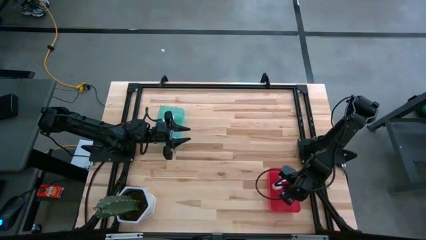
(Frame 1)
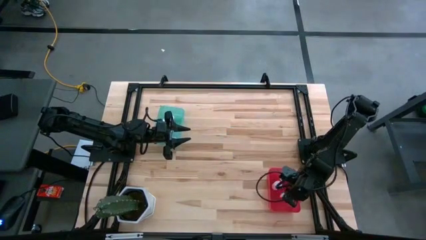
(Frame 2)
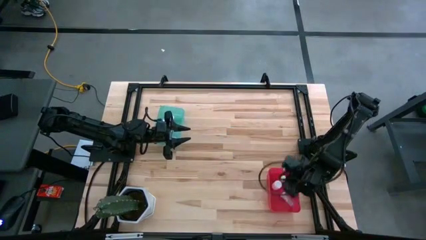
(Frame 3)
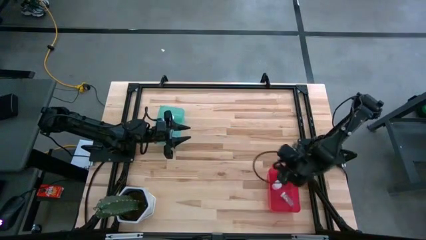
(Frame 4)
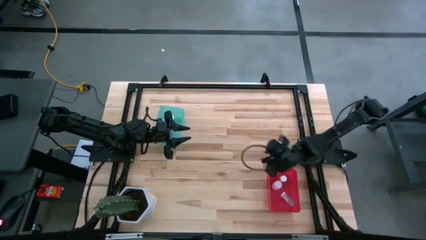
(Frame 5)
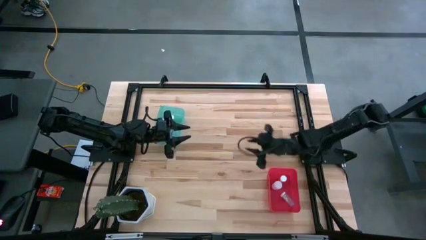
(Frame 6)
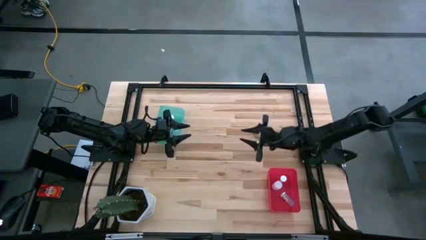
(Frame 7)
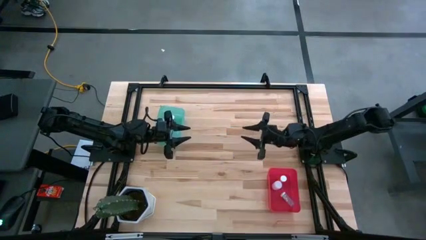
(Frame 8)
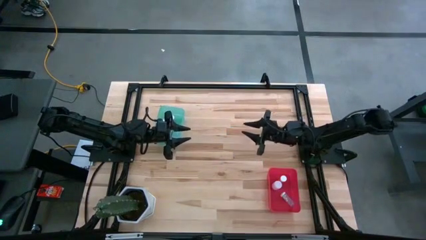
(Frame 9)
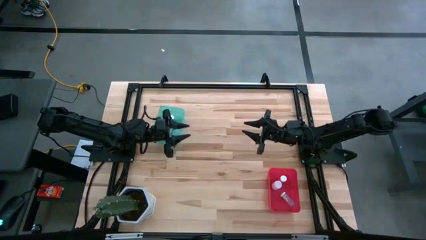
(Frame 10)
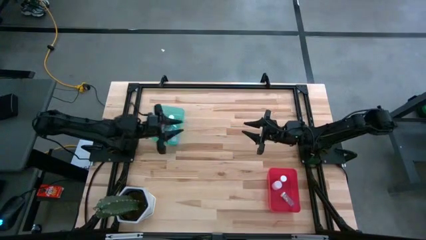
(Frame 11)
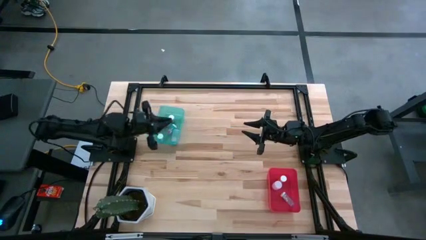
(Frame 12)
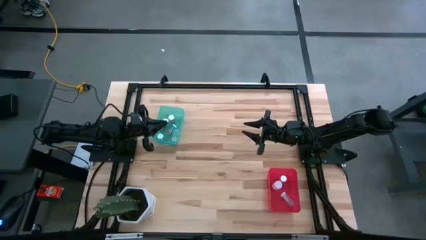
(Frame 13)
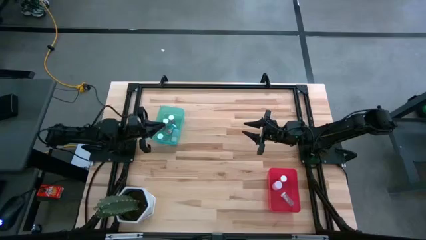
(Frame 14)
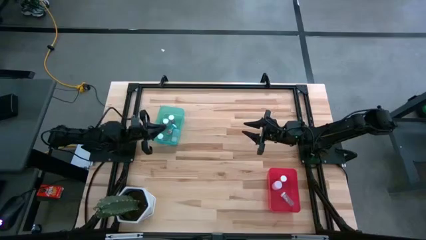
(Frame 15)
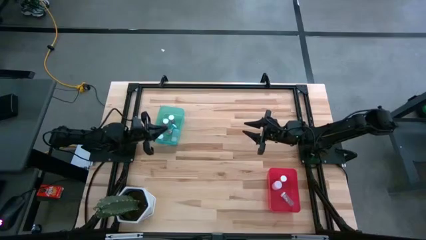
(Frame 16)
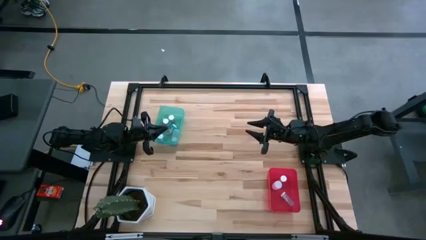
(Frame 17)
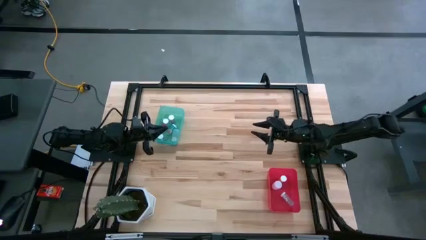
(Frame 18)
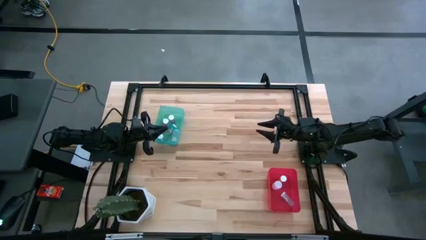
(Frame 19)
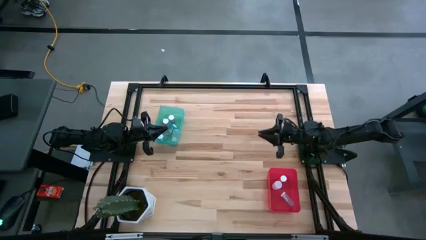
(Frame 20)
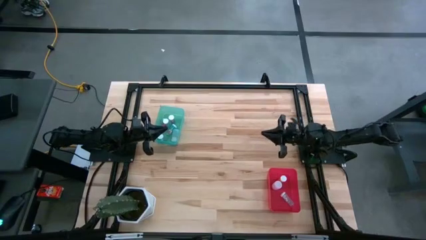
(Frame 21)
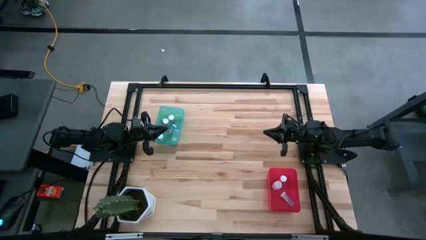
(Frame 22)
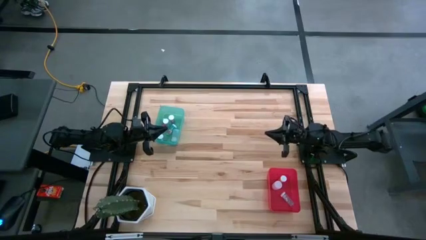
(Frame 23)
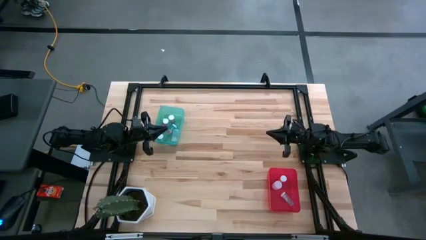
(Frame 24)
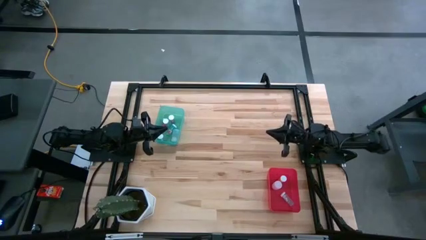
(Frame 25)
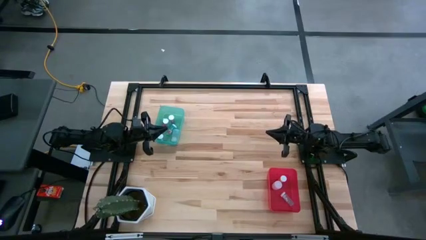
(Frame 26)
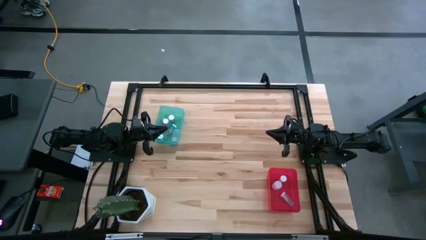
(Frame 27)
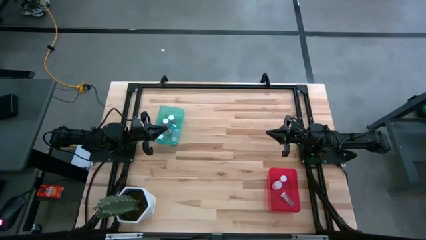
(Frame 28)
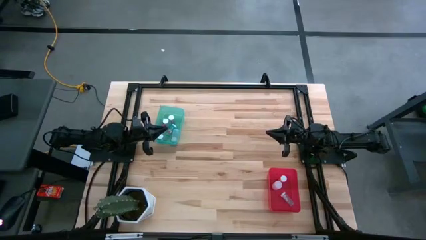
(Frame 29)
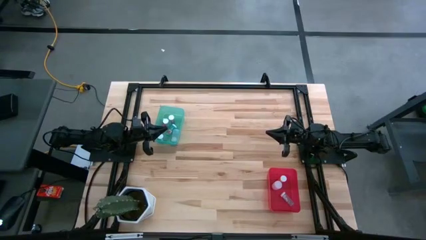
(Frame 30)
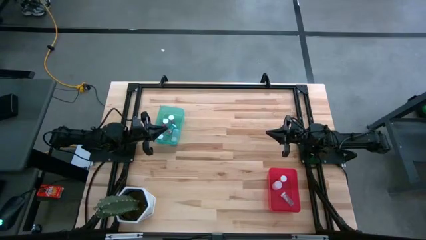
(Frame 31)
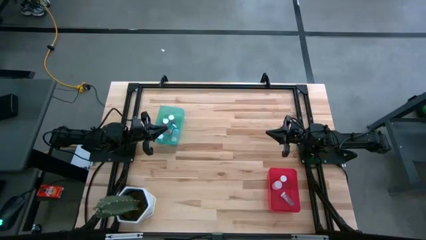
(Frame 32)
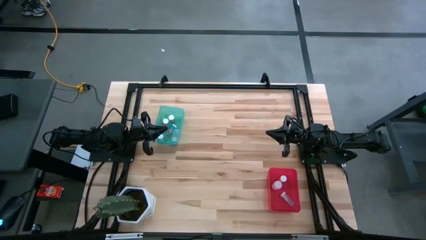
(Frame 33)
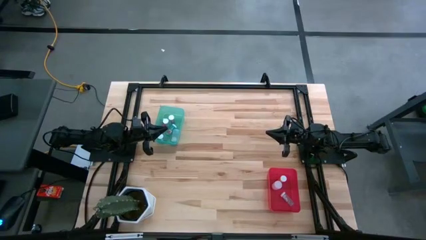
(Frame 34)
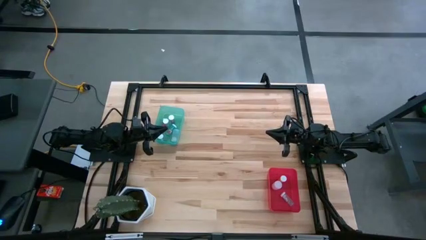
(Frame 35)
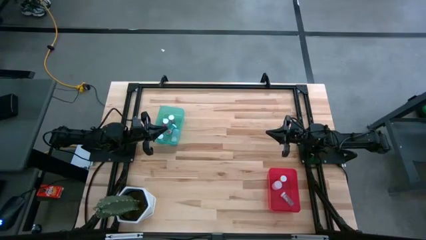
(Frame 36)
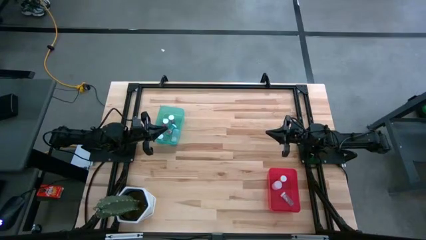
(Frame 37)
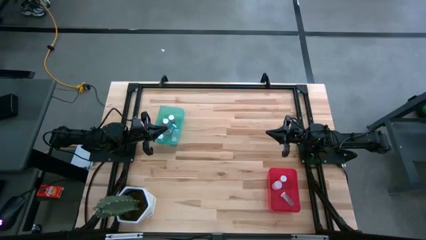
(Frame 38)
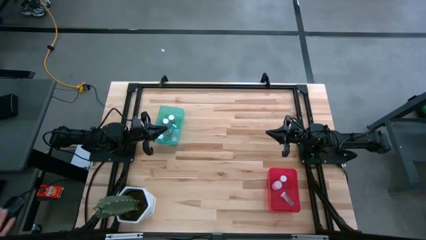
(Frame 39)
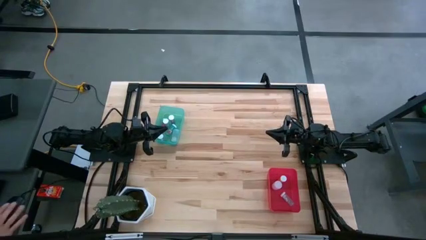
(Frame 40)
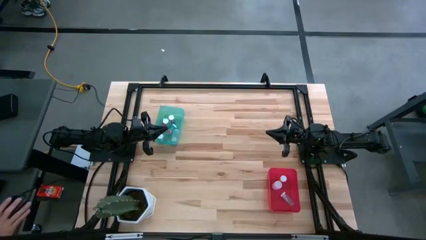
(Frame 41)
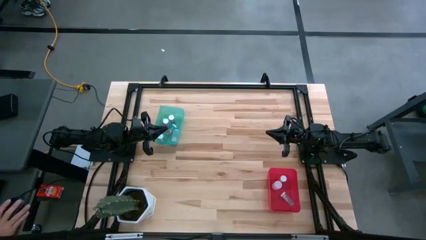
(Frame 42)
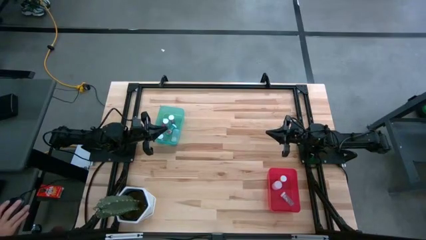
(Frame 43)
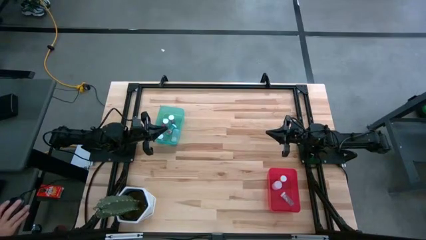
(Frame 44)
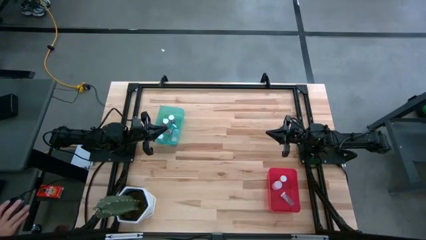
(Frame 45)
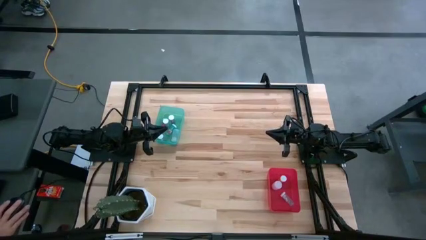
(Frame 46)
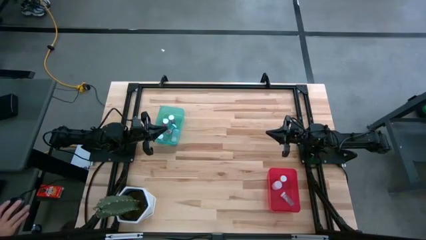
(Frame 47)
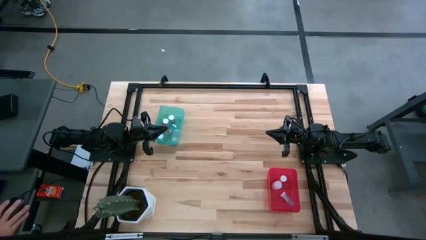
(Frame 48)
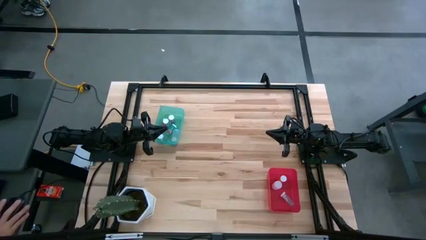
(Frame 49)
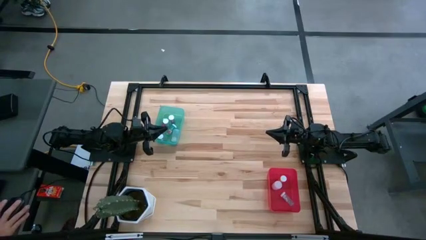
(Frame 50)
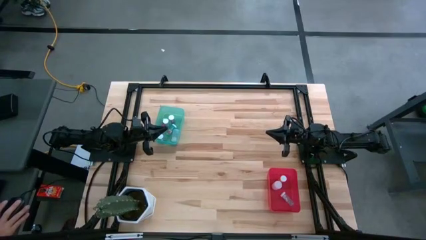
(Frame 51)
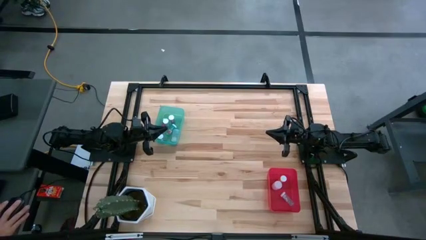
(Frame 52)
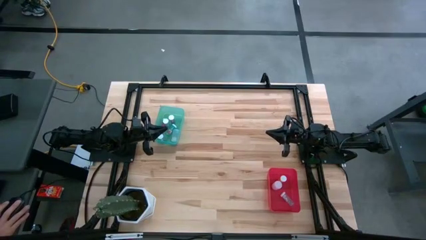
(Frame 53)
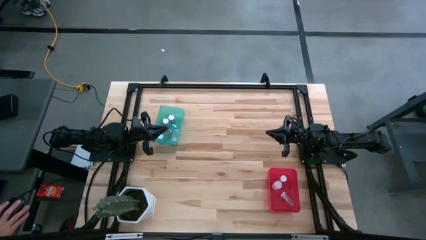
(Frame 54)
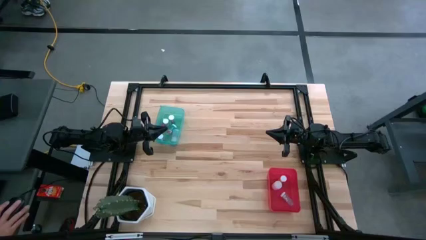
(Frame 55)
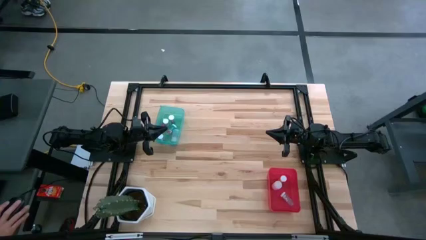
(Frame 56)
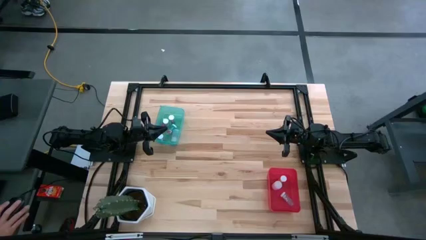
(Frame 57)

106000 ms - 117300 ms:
Task: Pick and place medicine bottles into bin by pill shape (circle, oval)
Return to Home Position
